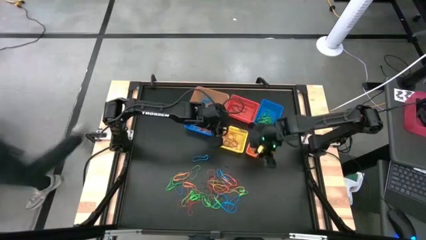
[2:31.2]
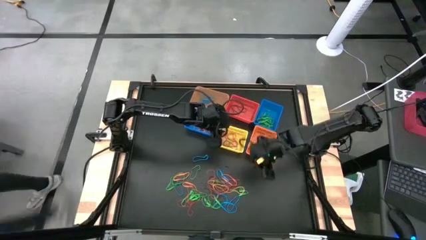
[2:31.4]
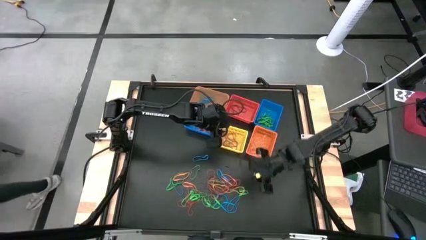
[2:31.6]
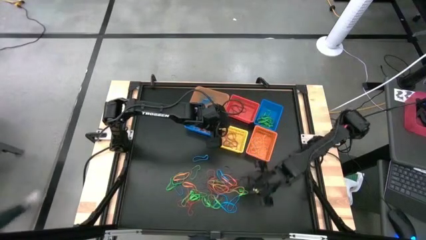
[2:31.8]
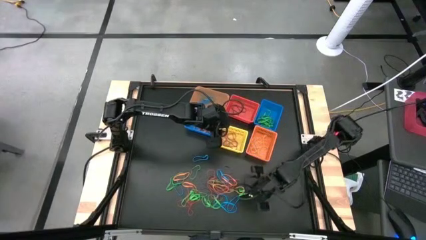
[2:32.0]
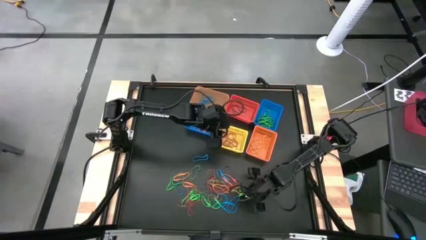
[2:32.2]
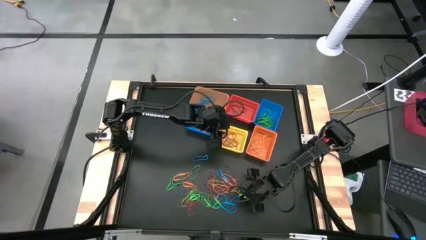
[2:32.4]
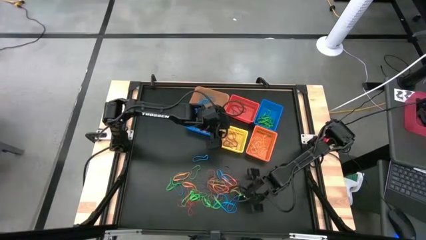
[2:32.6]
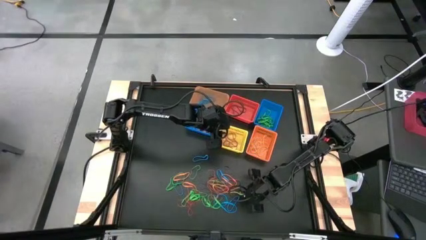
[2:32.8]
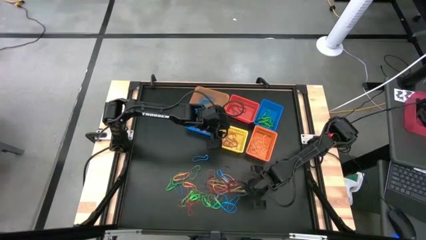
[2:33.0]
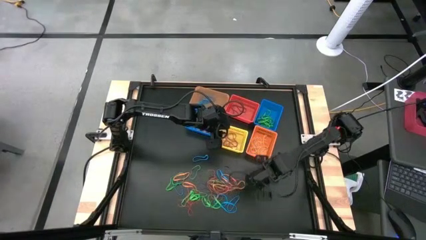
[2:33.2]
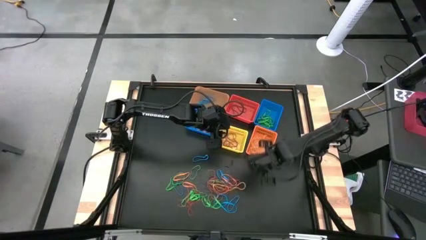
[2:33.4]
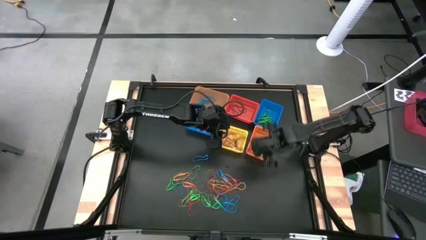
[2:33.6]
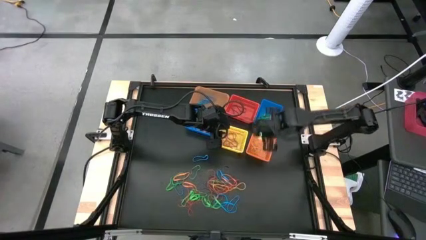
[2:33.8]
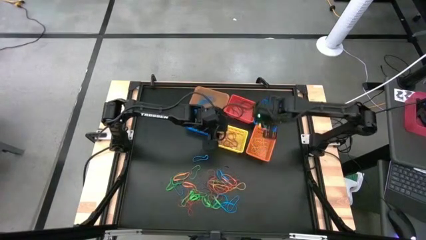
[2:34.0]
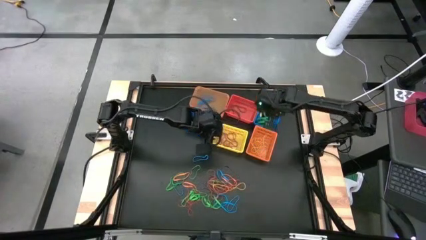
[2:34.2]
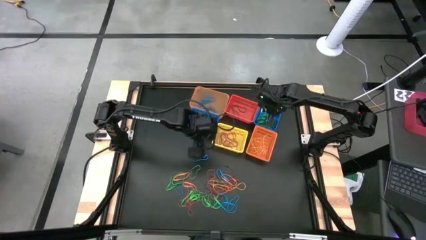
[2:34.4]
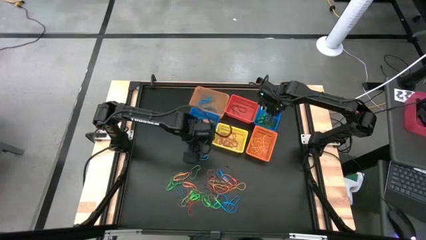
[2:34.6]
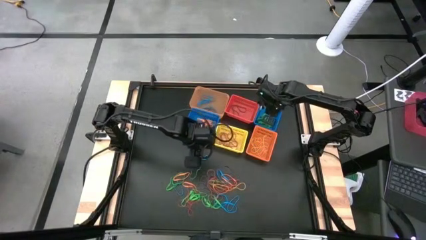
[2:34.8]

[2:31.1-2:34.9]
Task: Sort rubber bands into baskets
Put the green rubber band into the blue basket

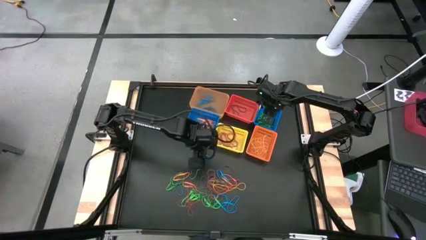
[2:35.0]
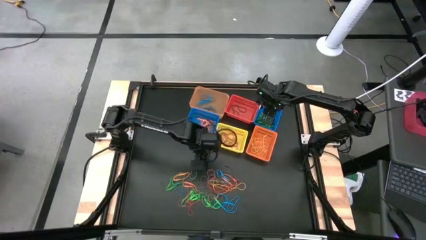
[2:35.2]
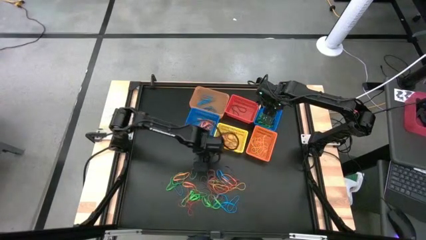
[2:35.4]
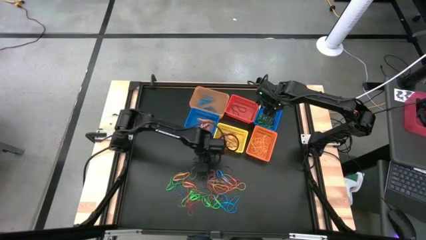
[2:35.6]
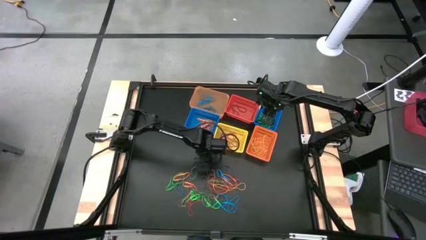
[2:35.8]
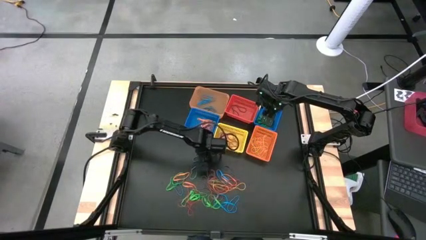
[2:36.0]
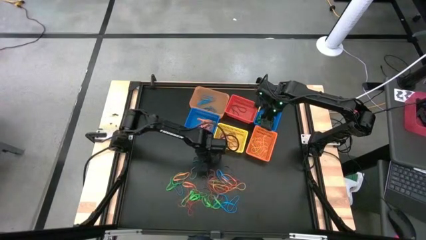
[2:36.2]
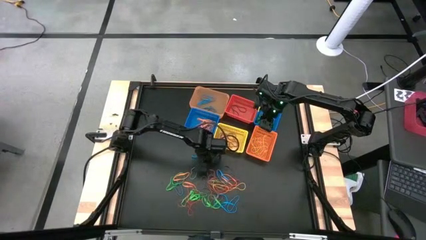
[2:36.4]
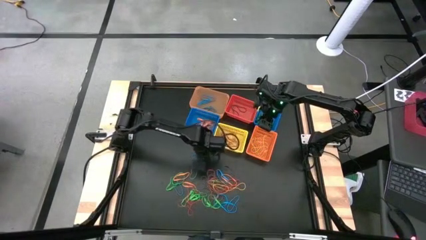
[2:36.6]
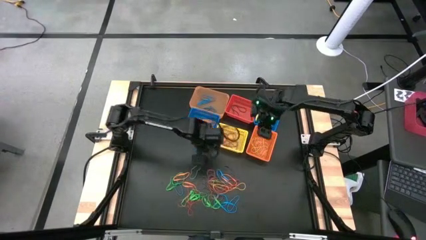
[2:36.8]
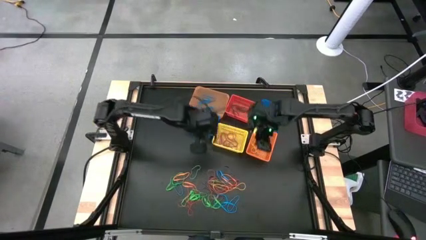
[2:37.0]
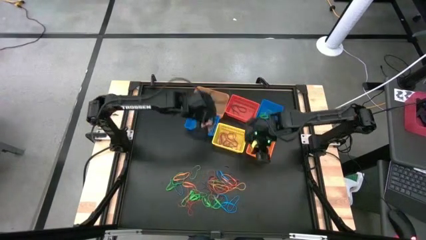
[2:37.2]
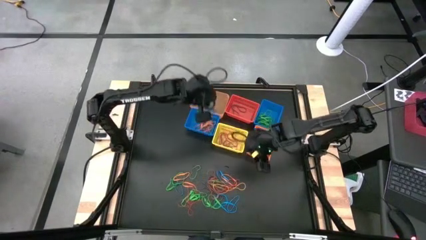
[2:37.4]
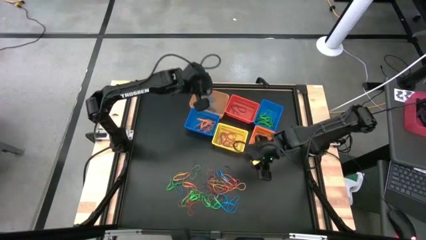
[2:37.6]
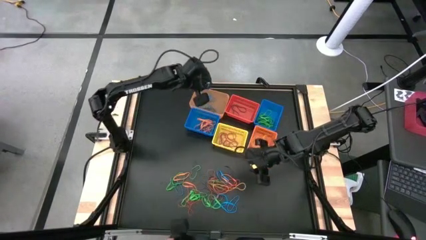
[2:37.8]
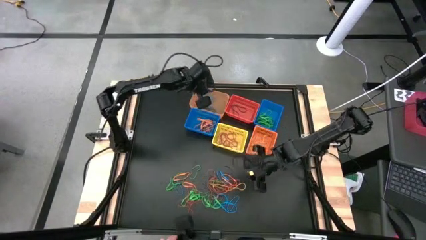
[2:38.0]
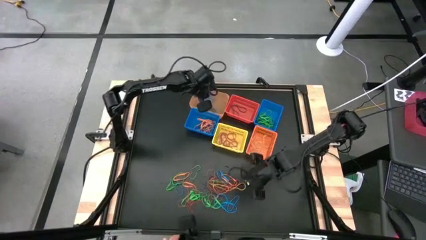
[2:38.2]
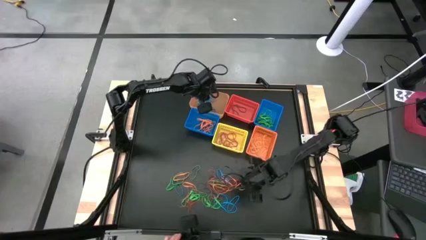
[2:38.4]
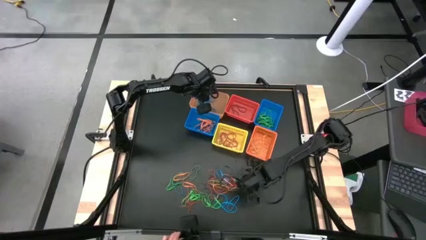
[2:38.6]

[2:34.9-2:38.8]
Put the blue rubber band into the transparent orange basket

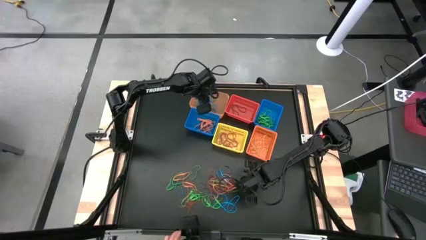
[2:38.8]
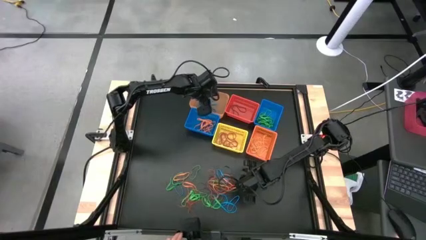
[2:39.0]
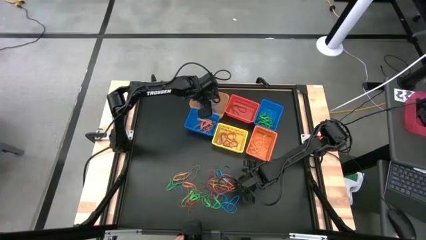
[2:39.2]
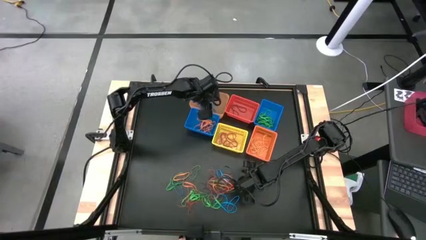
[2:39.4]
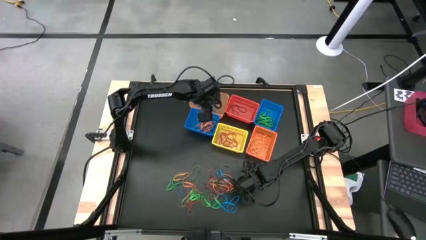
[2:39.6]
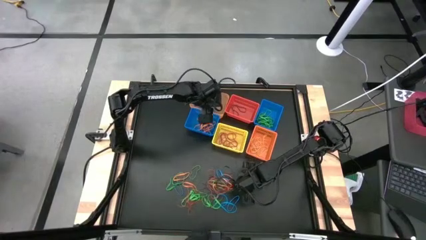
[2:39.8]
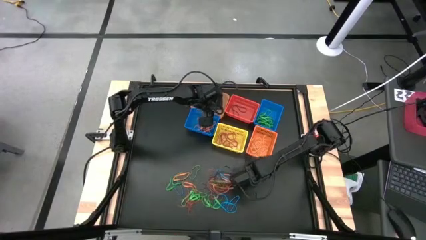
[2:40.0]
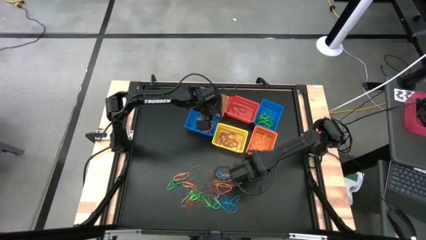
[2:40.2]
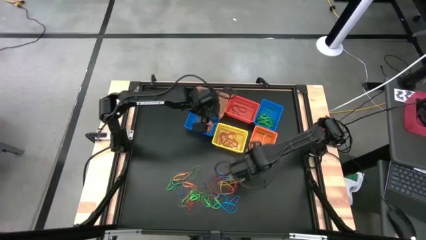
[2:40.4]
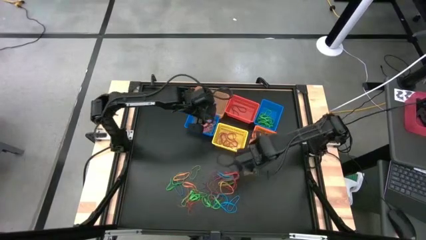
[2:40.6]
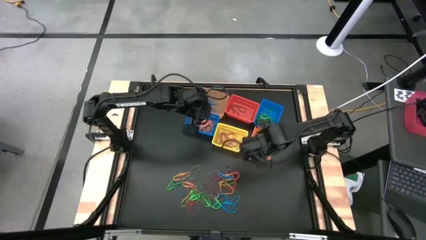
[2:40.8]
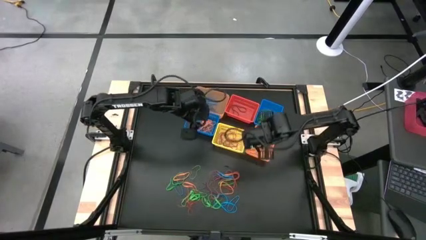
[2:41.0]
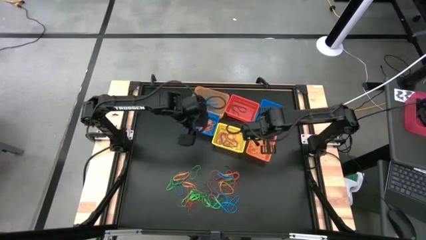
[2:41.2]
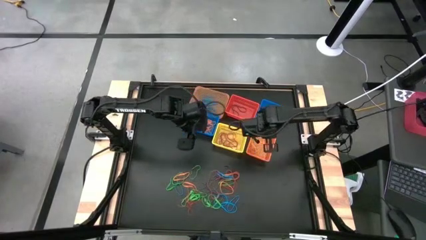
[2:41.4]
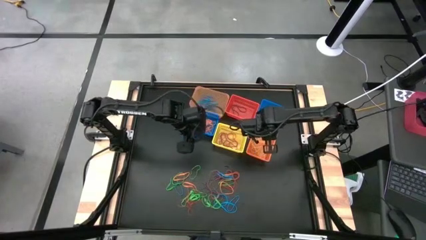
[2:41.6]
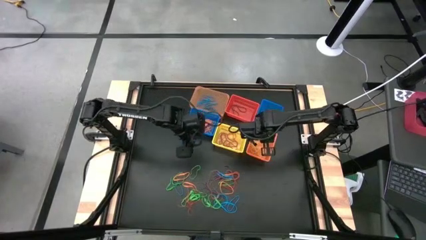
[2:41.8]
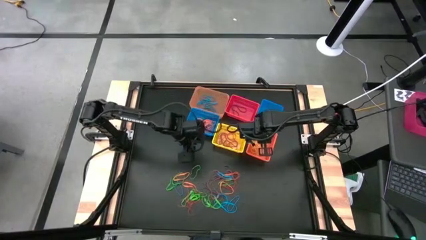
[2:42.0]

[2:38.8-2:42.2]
Put the yellow rubber band into the orange basket

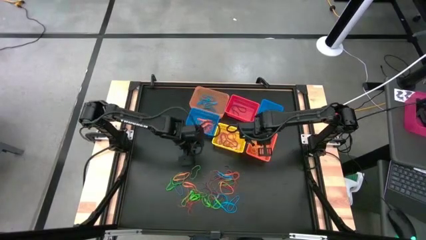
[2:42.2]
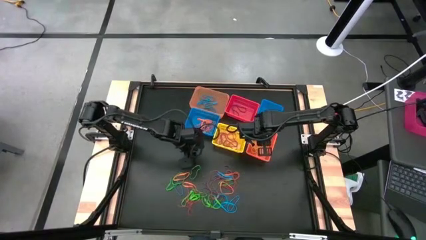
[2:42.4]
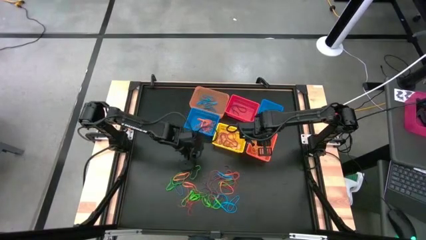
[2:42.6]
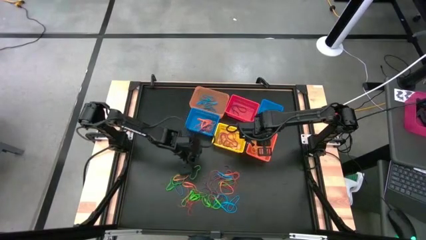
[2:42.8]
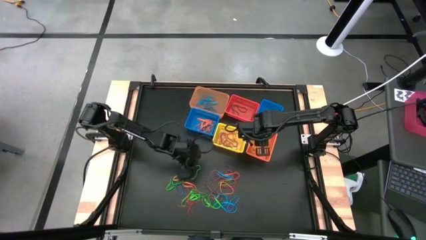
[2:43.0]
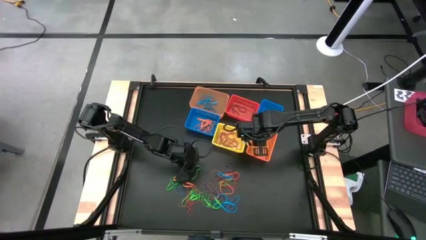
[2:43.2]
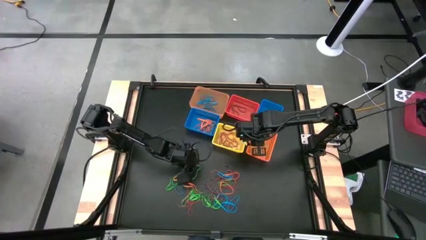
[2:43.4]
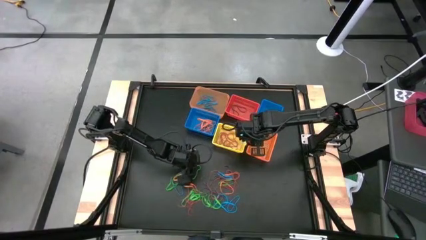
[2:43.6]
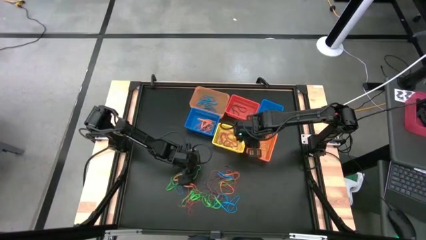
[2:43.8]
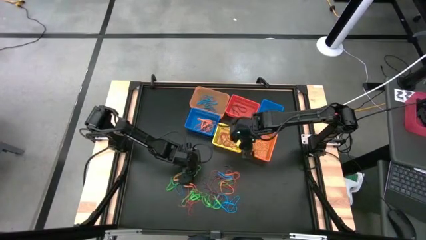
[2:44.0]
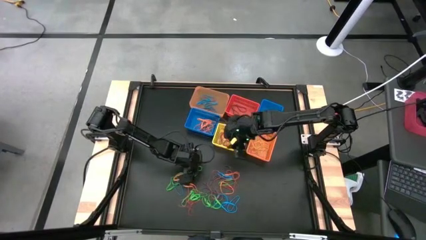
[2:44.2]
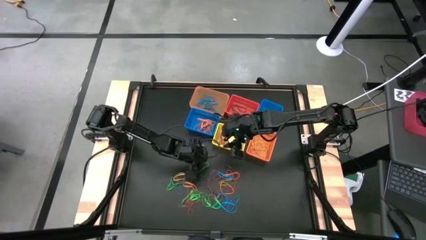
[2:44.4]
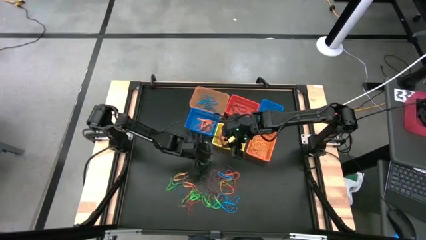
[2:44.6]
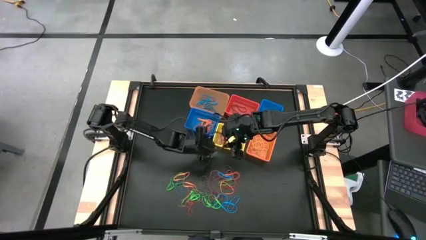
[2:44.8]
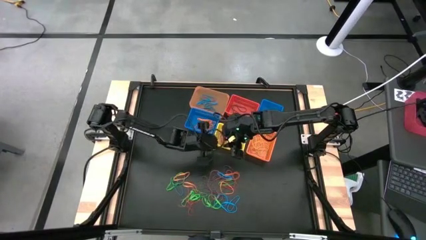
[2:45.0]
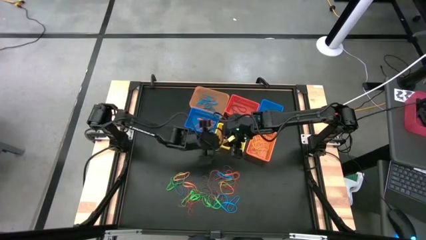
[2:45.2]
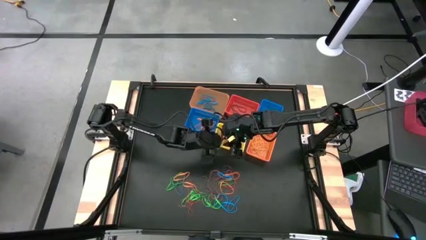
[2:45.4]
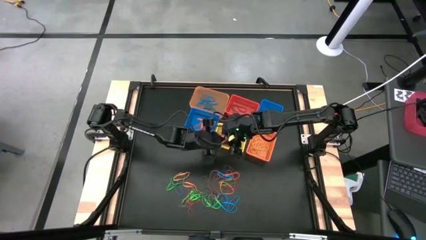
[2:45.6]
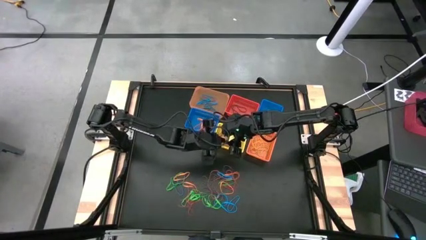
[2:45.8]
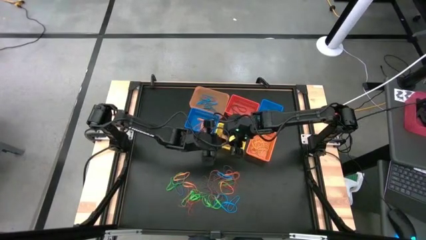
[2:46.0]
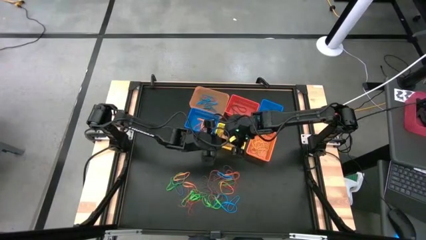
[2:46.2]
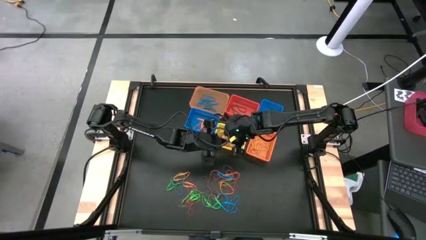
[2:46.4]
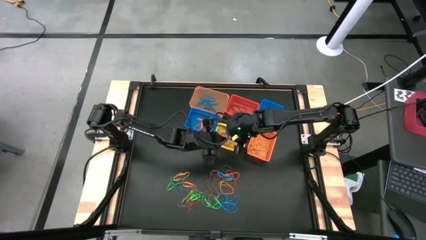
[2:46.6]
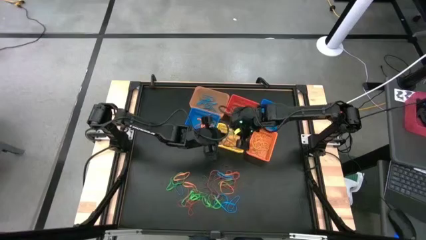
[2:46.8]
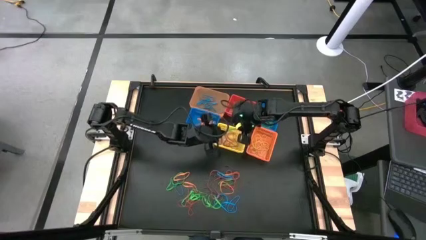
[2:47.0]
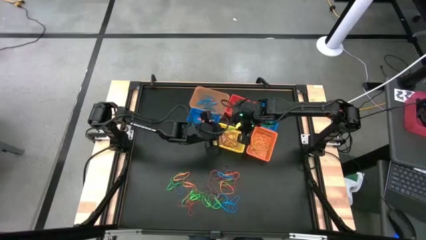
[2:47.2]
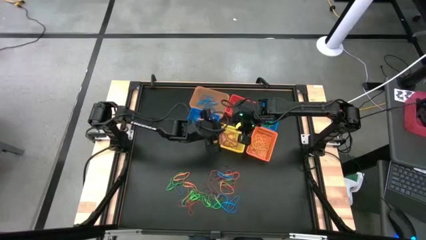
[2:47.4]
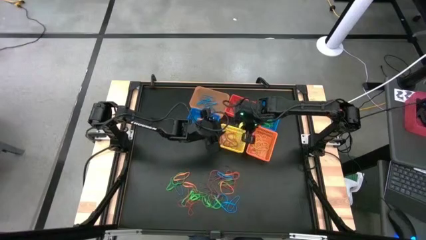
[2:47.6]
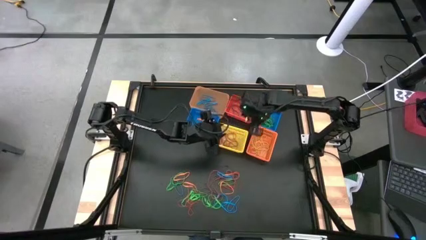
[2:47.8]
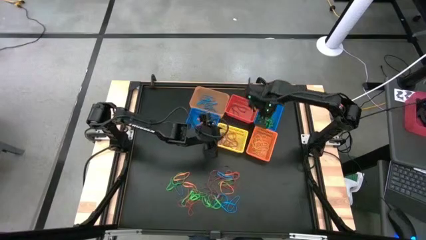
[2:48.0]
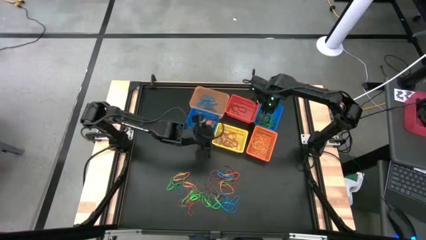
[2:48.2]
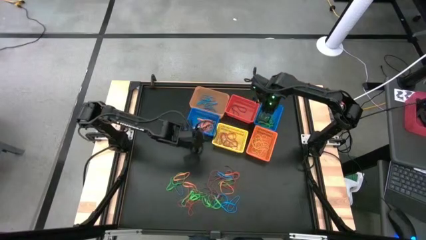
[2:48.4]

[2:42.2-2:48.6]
Put the green rubber band into the right blue basket
